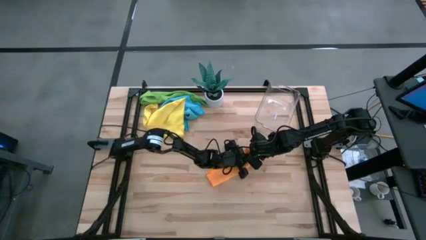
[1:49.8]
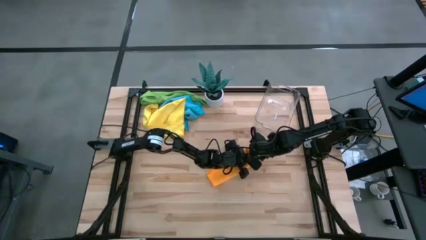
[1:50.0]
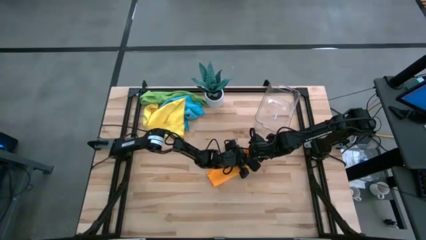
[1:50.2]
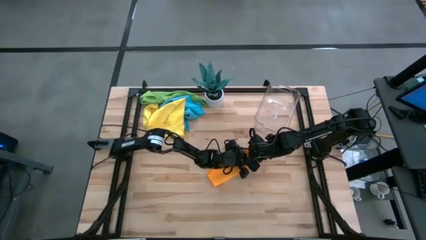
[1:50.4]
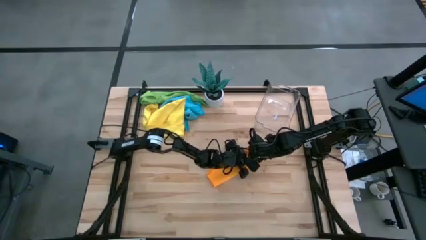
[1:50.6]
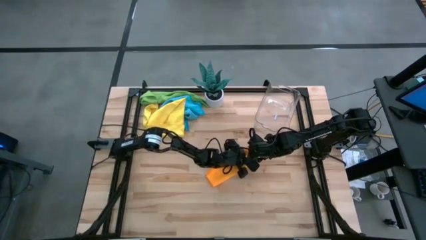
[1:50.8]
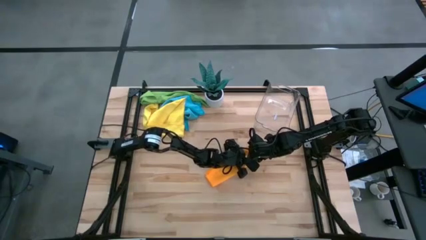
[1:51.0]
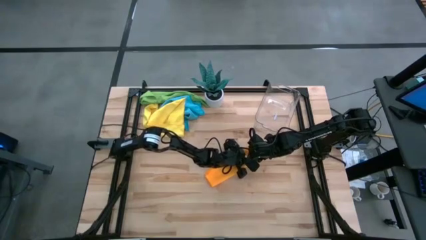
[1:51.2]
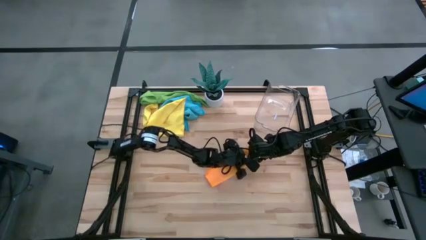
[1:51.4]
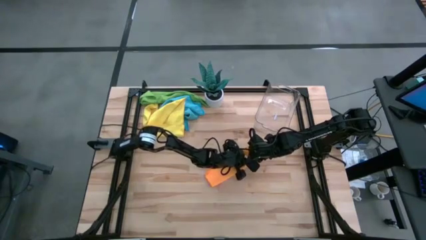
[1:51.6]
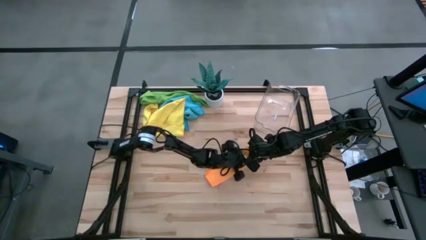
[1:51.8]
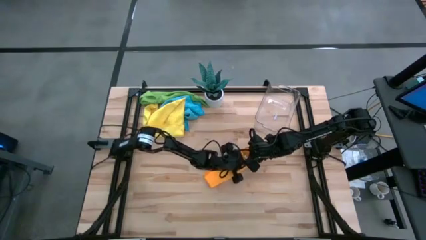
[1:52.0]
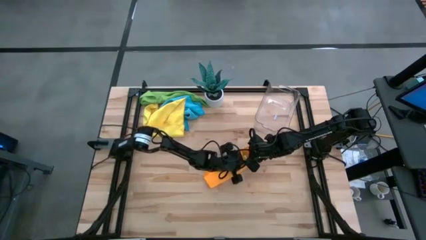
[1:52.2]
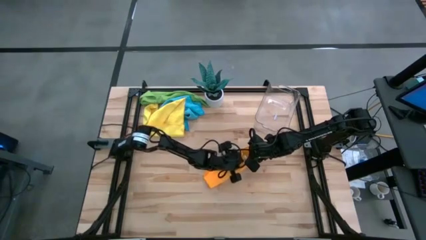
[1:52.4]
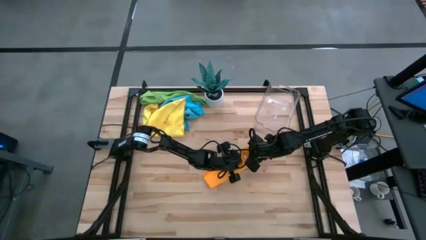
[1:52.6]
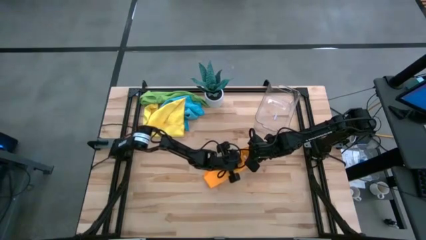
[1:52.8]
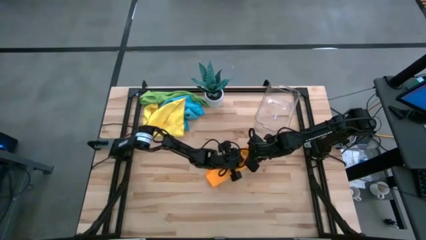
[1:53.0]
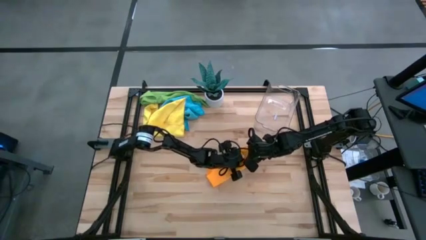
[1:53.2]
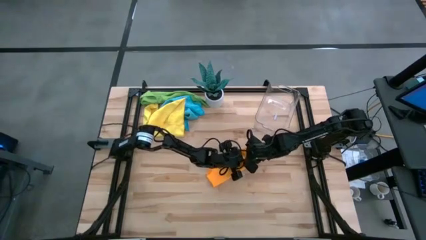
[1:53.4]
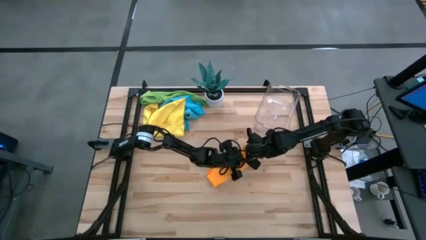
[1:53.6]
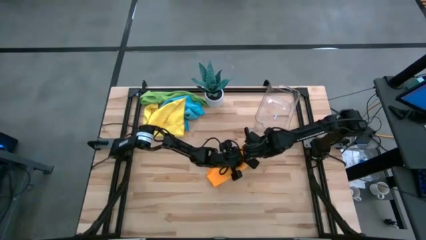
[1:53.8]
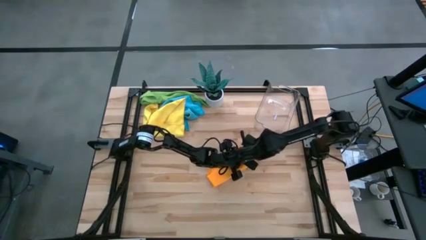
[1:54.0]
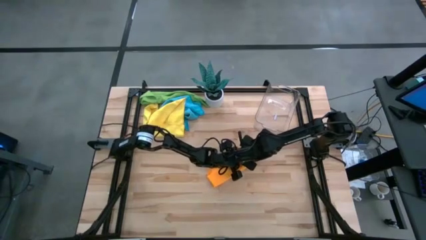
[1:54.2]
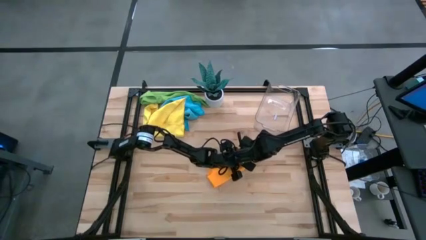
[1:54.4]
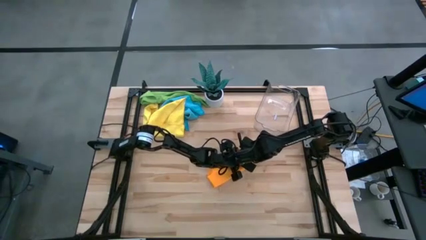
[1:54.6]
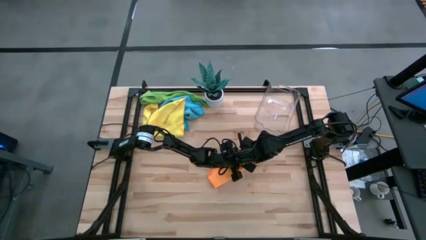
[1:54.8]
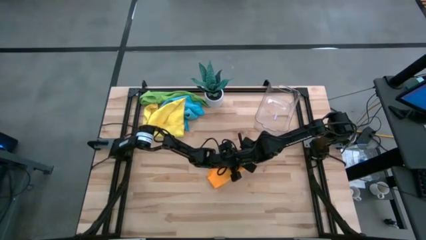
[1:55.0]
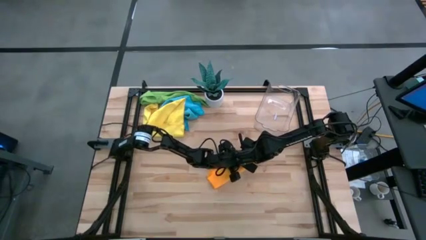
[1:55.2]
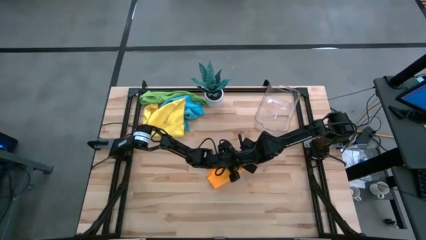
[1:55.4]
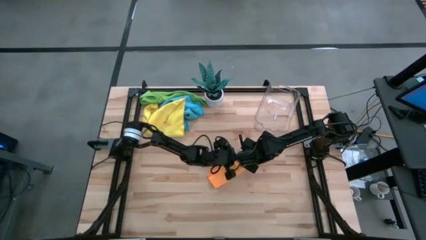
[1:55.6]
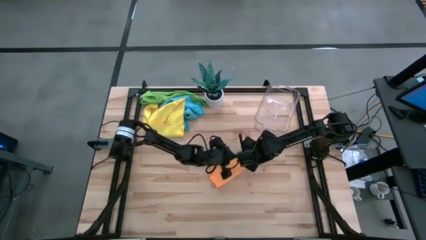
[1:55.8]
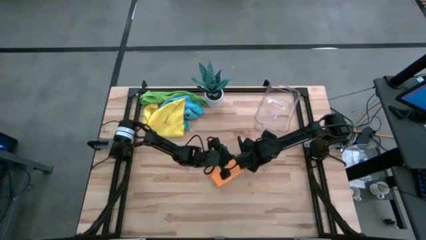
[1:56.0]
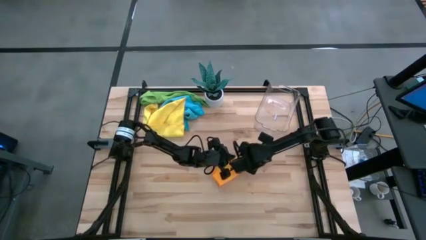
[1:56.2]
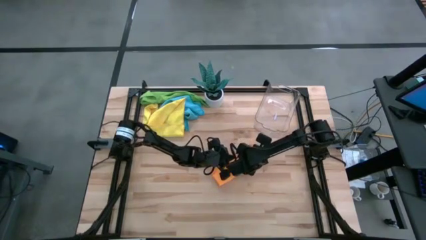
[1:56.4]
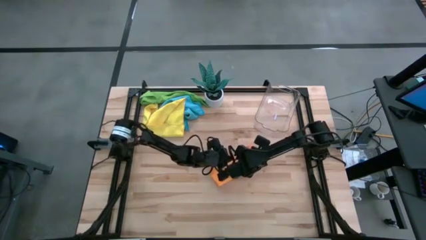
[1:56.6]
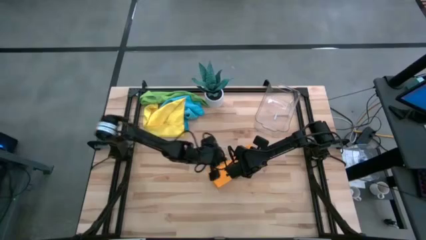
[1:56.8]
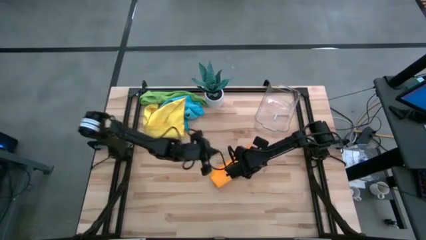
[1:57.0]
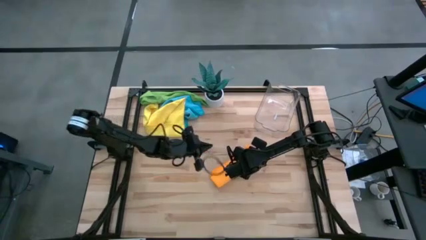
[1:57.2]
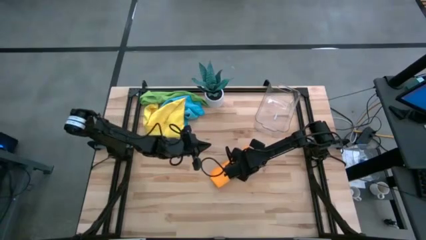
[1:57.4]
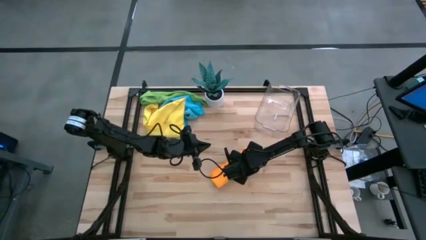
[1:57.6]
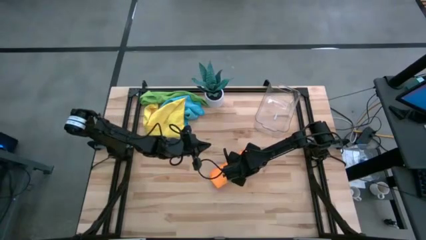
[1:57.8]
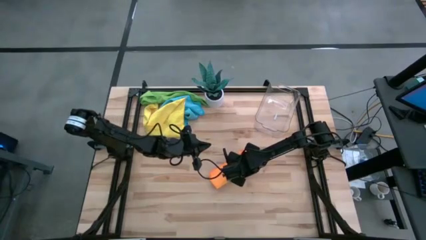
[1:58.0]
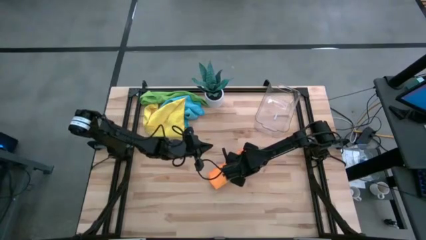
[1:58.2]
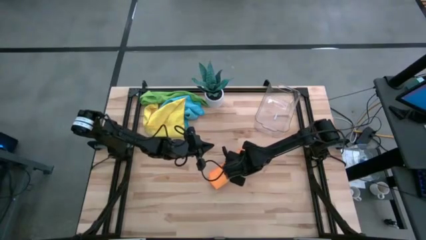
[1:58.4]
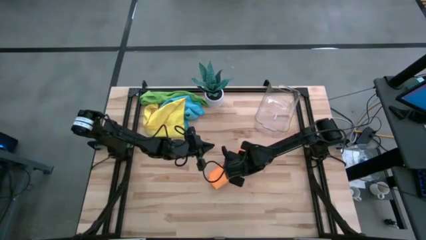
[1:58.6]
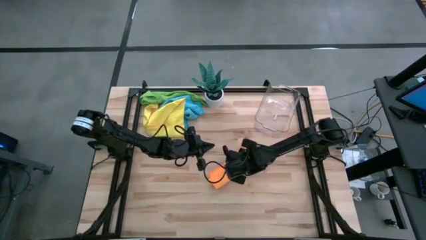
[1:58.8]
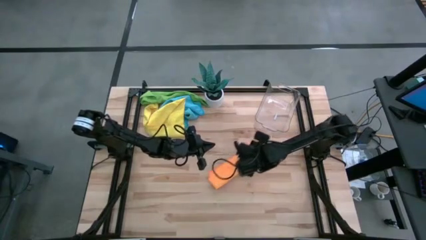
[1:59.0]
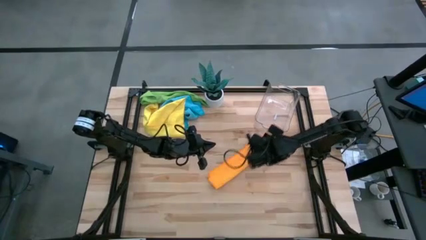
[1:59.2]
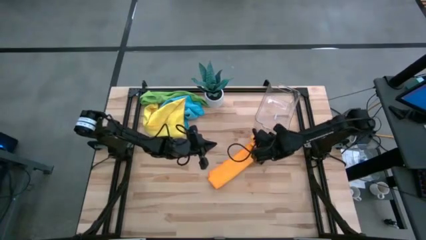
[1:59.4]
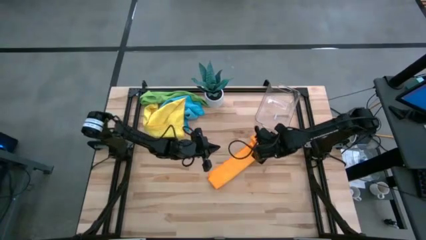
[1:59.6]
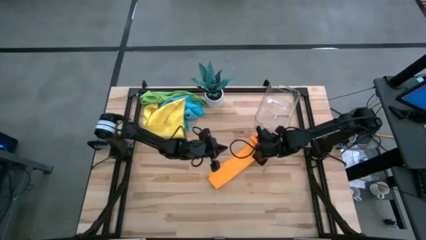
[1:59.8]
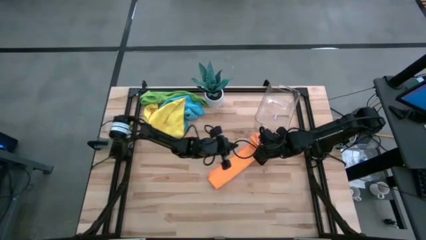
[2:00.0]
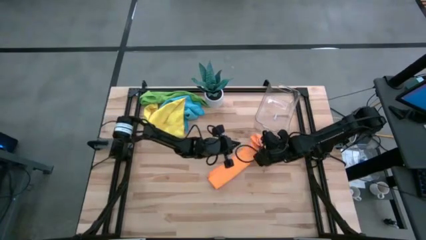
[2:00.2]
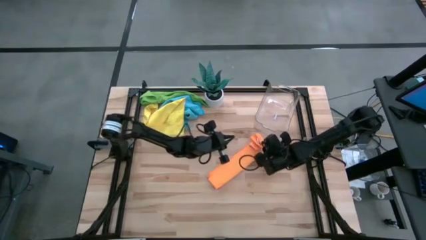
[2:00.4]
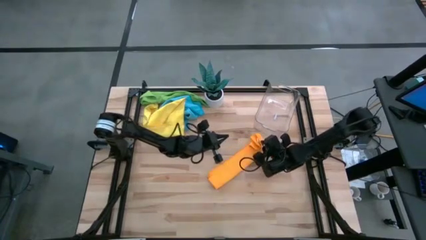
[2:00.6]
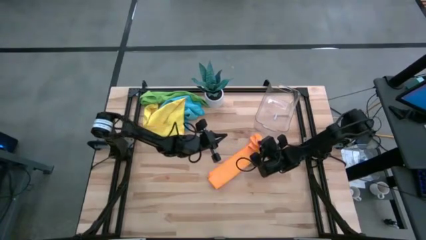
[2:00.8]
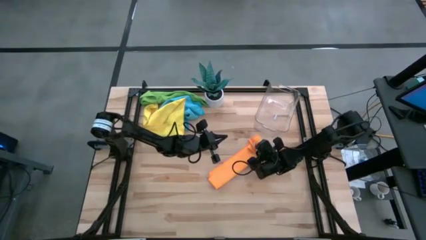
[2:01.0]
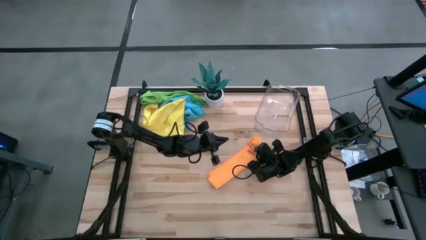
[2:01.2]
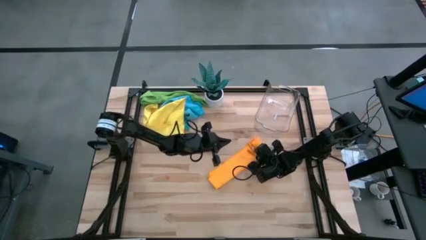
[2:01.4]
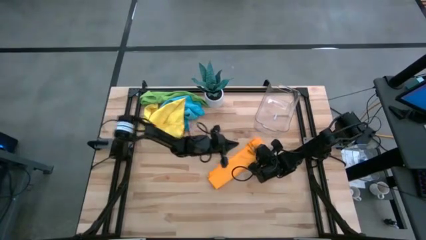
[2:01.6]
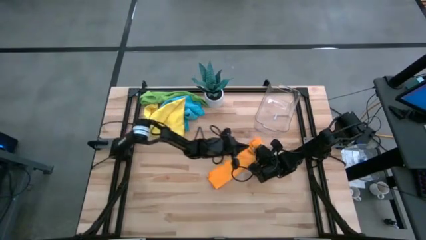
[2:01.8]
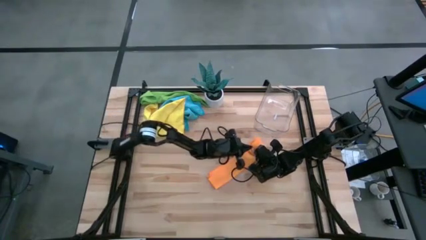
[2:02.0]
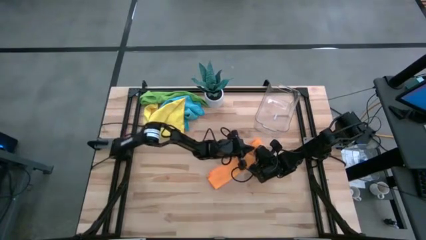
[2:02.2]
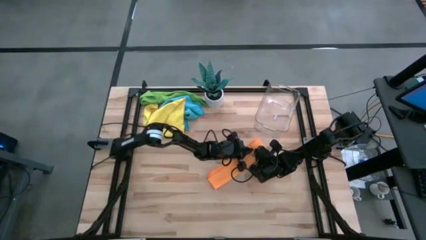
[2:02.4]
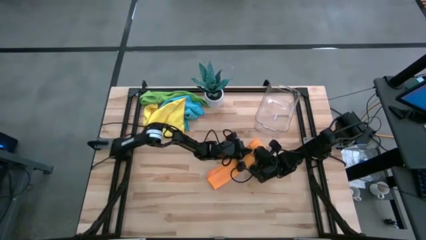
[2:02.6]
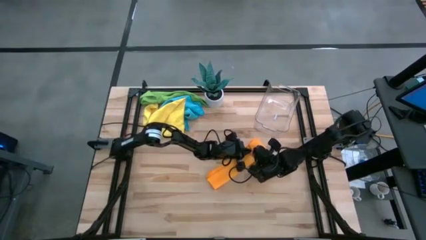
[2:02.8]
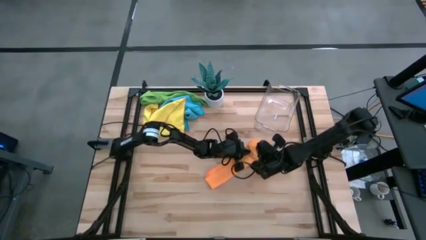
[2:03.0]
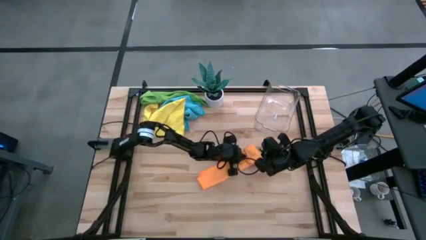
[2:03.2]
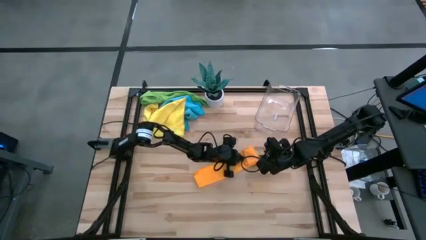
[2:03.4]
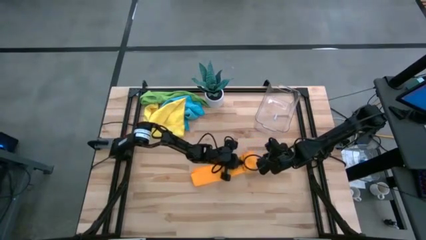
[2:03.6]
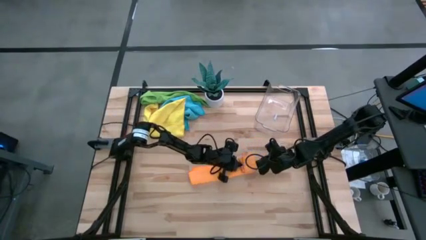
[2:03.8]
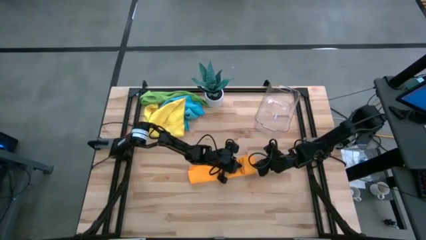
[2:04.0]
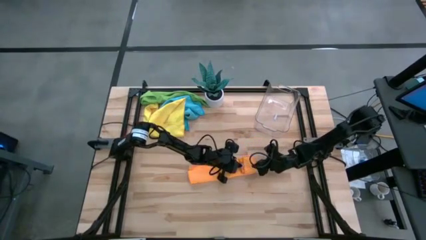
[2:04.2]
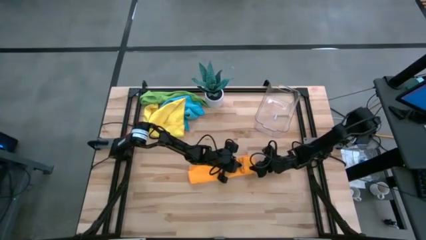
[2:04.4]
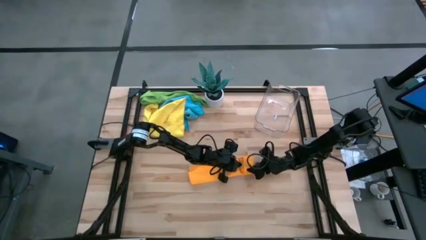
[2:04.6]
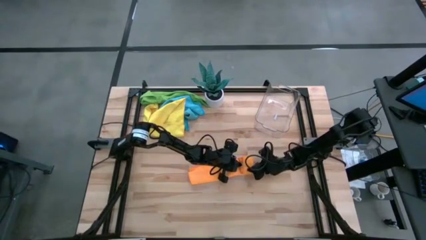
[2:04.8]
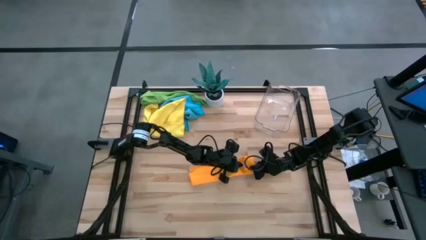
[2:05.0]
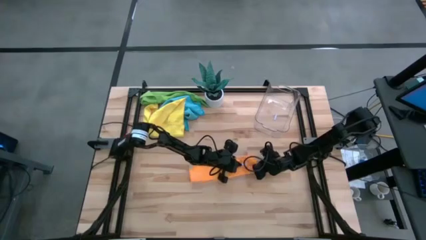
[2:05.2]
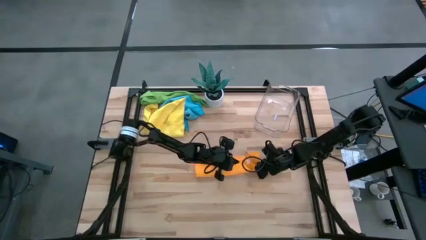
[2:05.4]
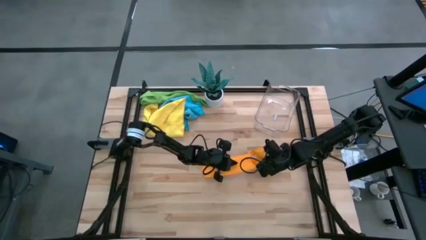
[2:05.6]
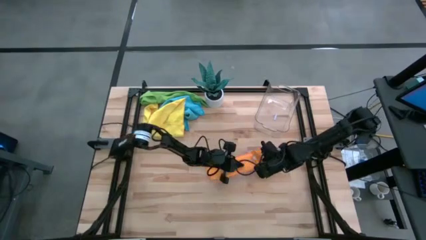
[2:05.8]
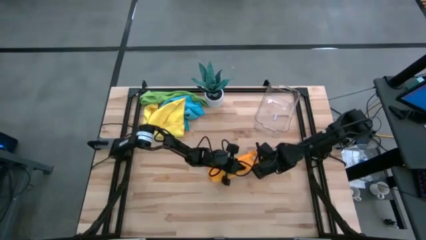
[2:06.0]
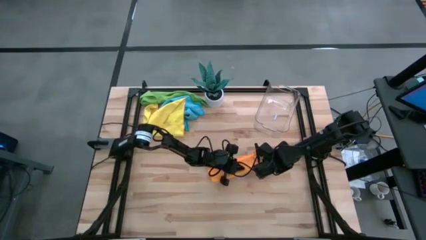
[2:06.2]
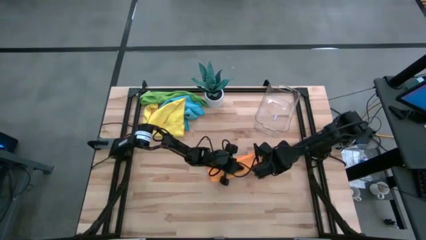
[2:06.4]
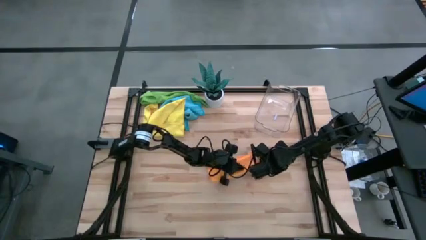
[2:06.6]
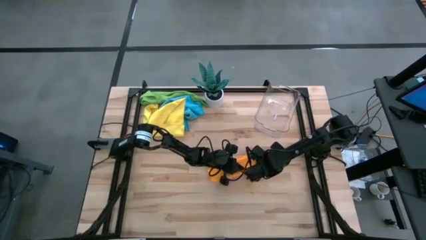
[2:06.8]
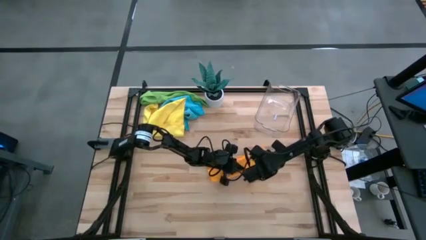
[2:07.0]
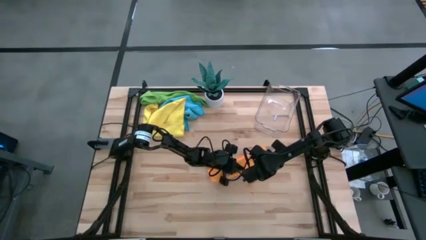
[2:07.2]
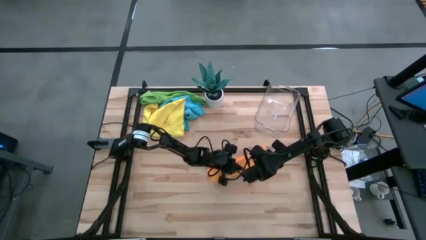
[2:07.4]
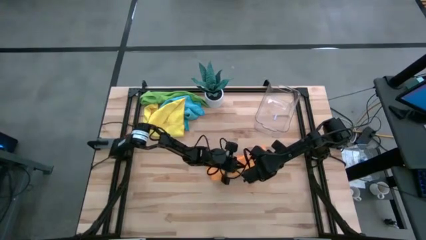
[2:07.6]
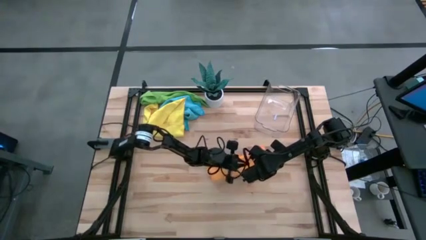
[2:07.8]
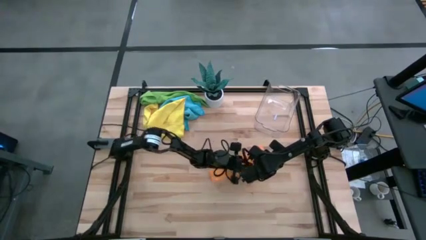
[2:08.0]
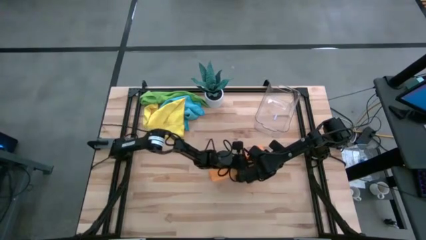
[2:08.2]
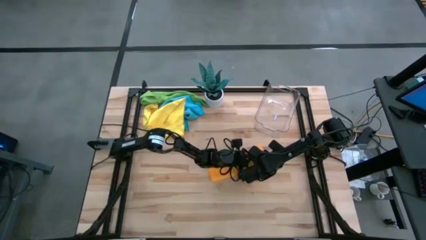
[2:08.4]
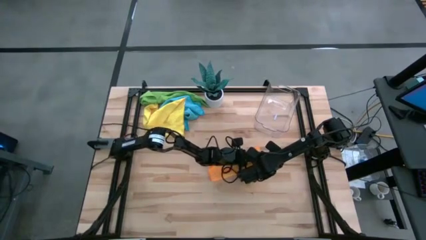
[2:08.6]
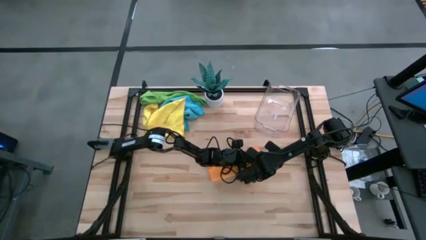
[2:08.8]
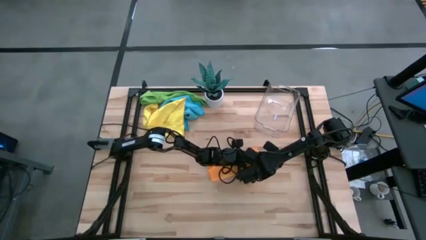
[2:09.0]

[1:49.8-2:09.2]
Task: Roll microfiber towels into tight, uniform cylinder then place into a basket
Roll the orange microfiber cloth
